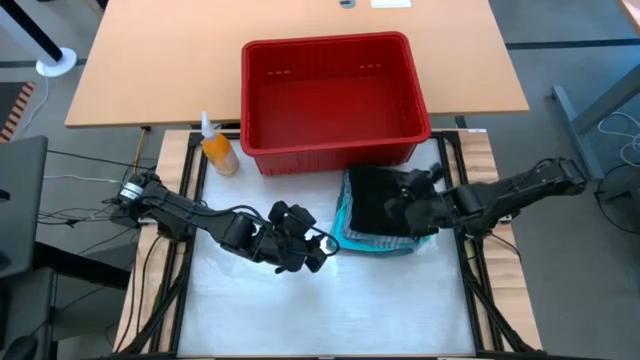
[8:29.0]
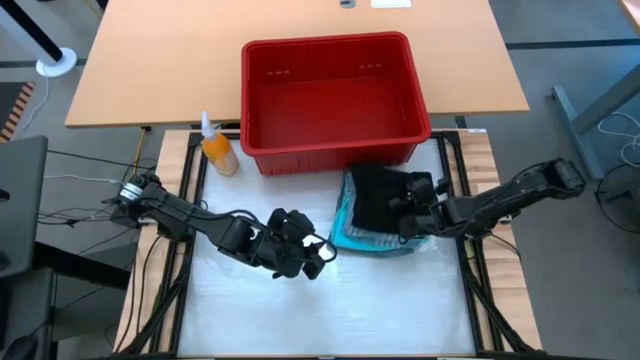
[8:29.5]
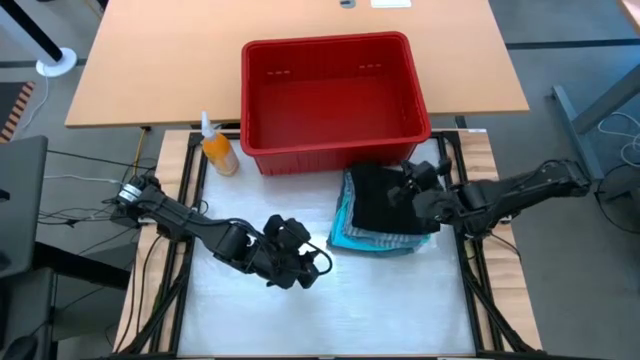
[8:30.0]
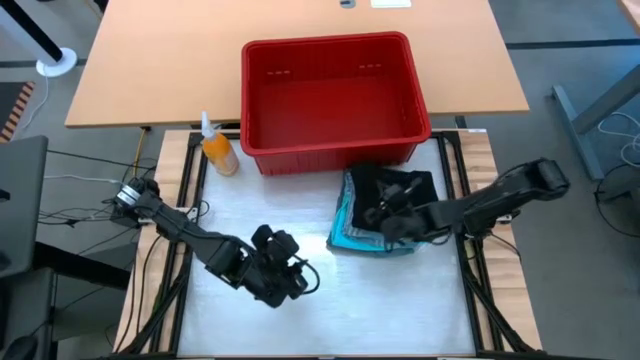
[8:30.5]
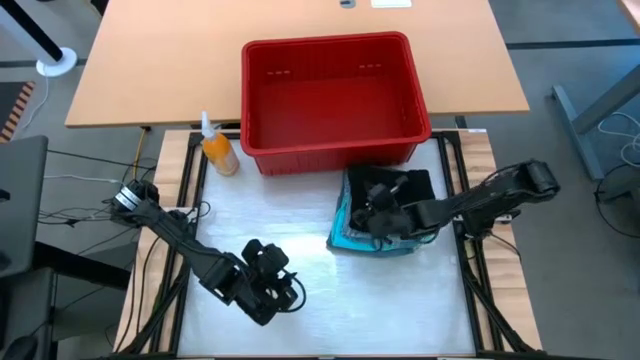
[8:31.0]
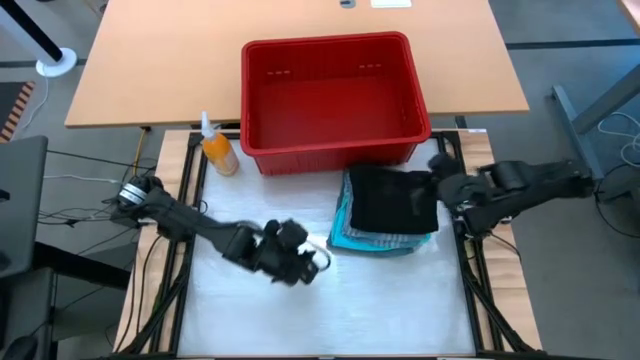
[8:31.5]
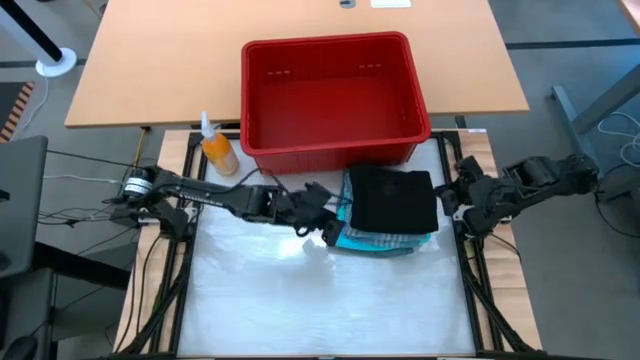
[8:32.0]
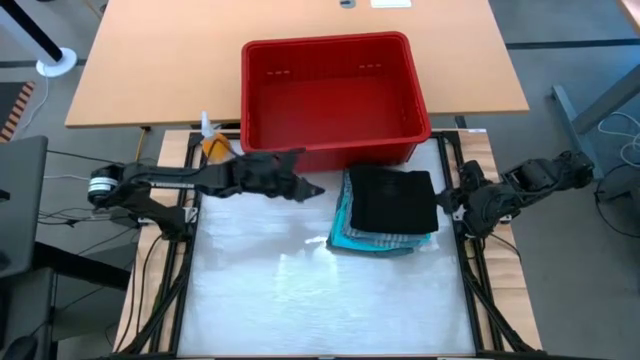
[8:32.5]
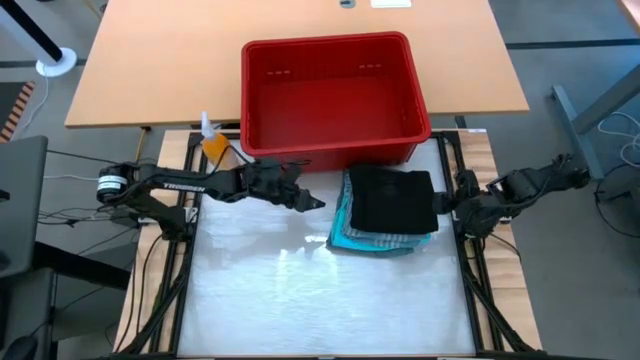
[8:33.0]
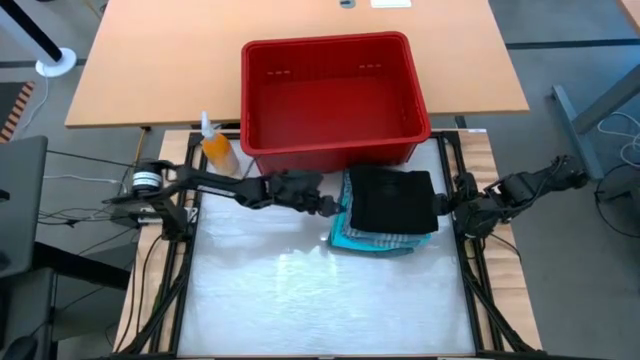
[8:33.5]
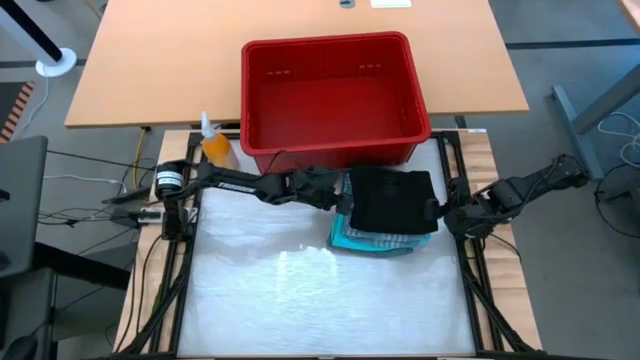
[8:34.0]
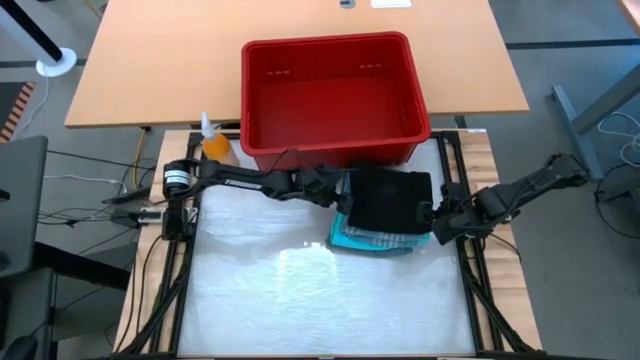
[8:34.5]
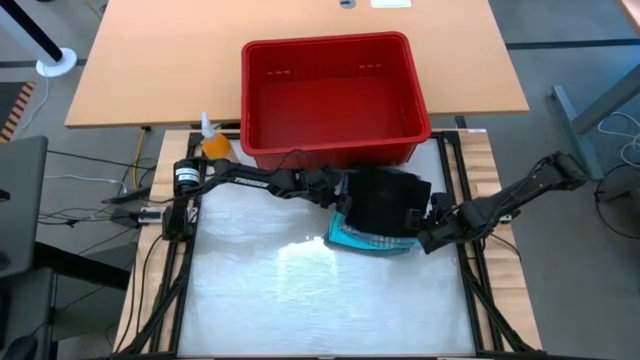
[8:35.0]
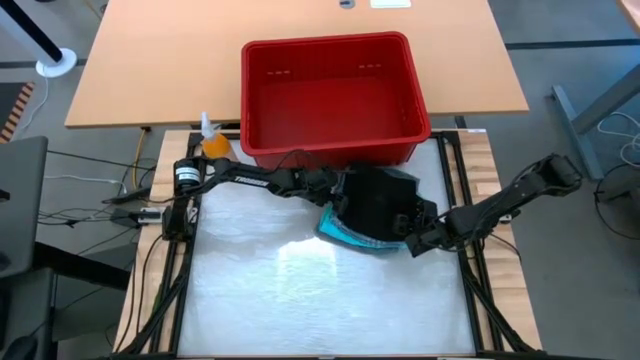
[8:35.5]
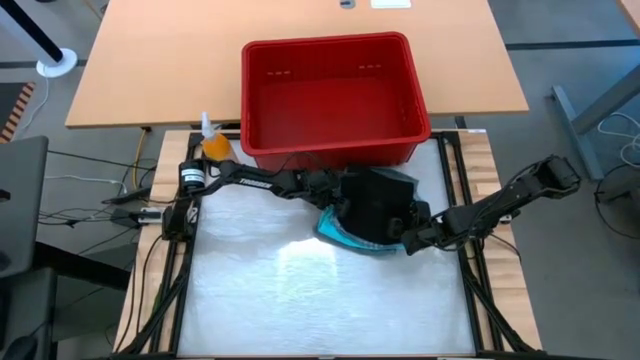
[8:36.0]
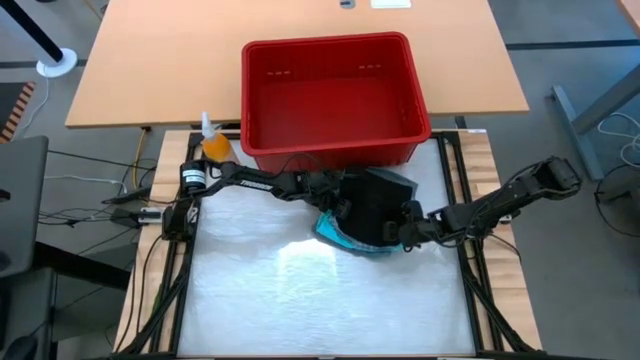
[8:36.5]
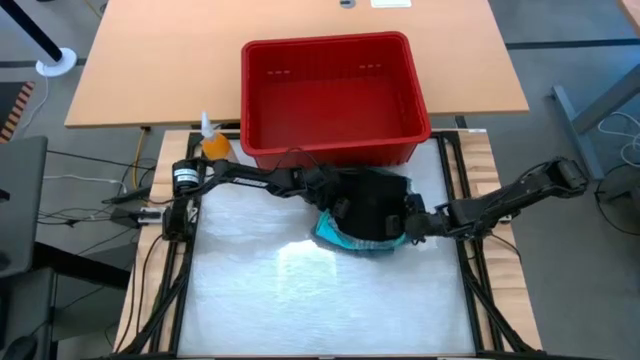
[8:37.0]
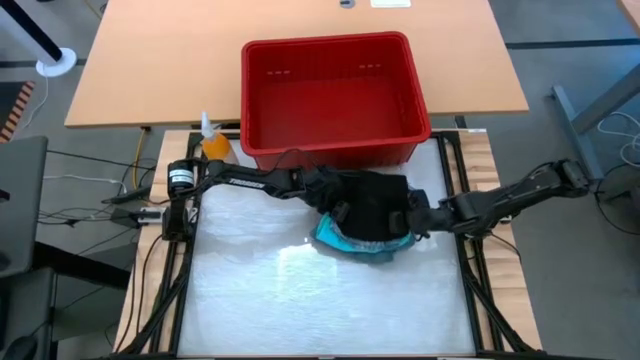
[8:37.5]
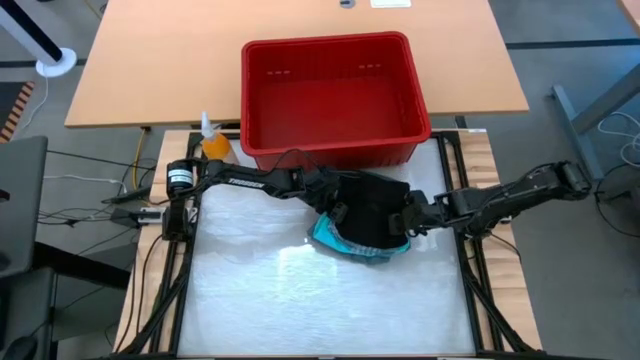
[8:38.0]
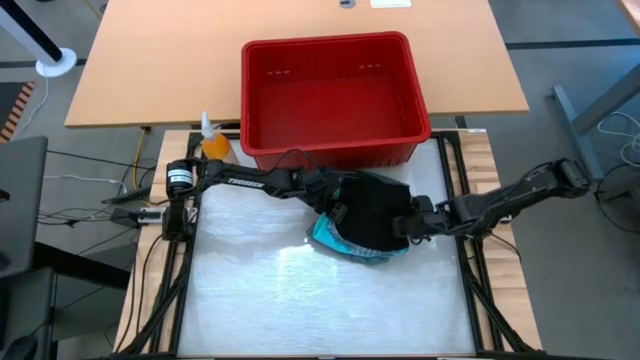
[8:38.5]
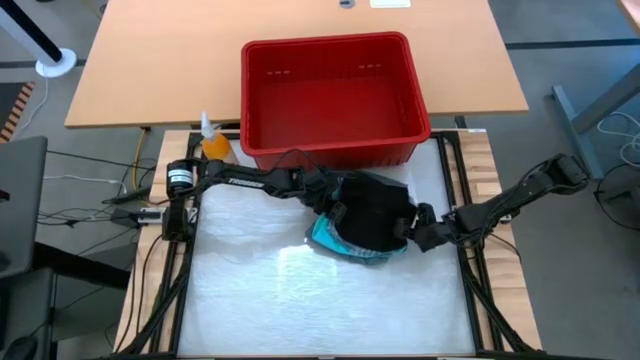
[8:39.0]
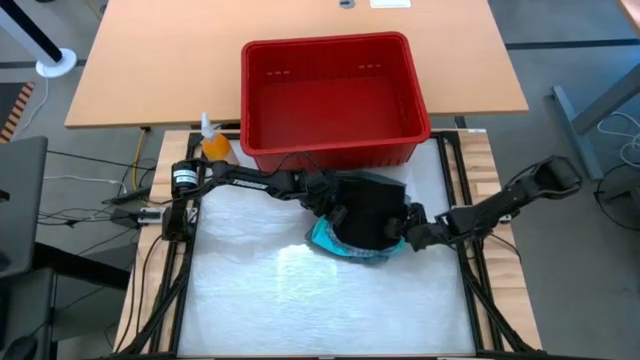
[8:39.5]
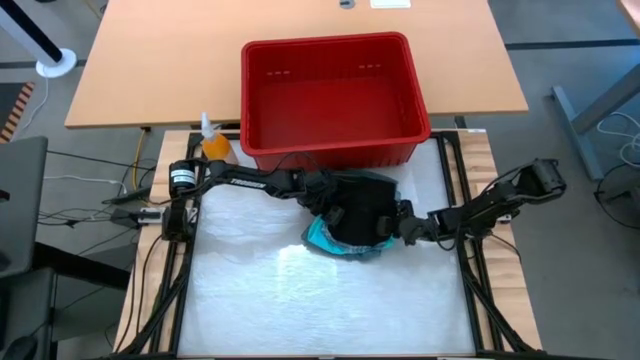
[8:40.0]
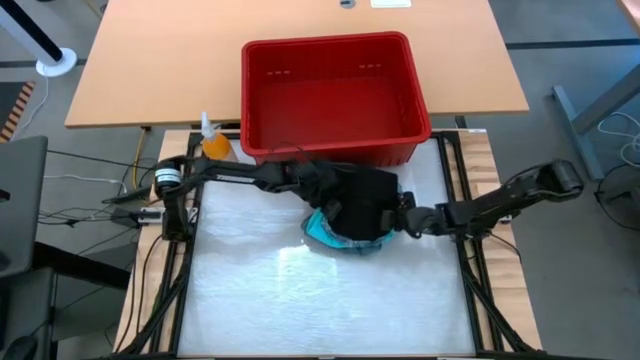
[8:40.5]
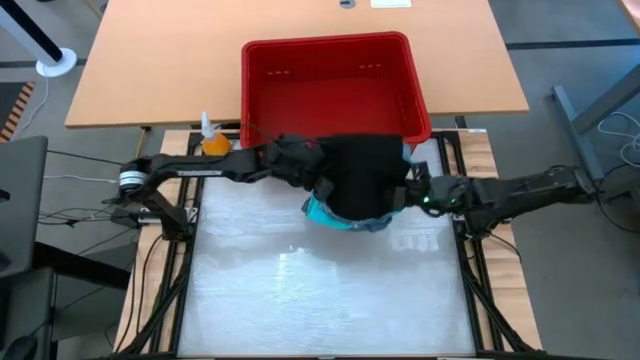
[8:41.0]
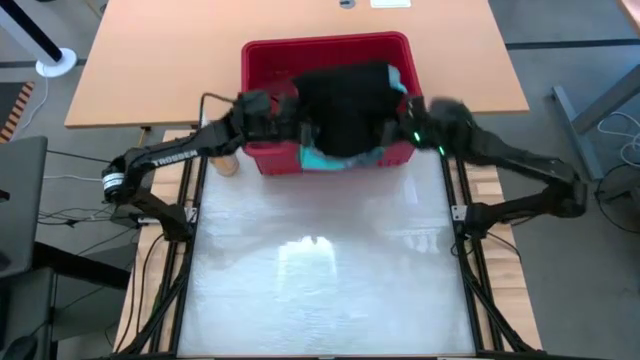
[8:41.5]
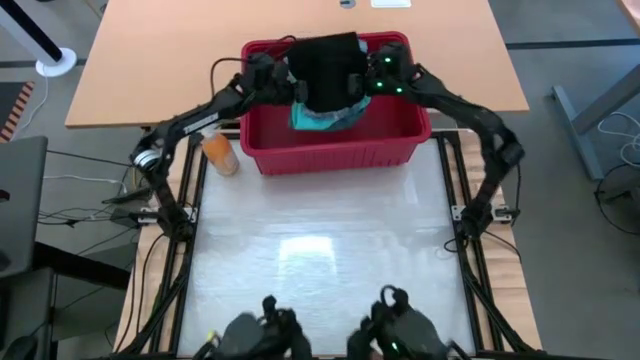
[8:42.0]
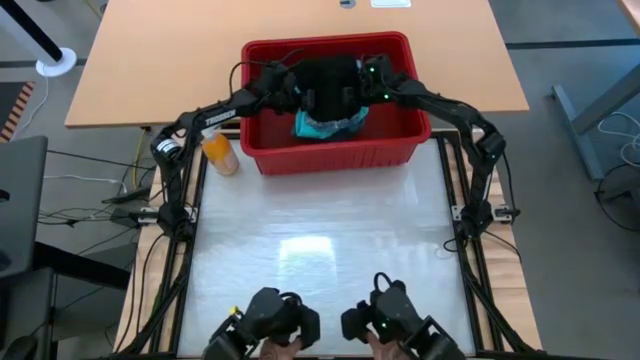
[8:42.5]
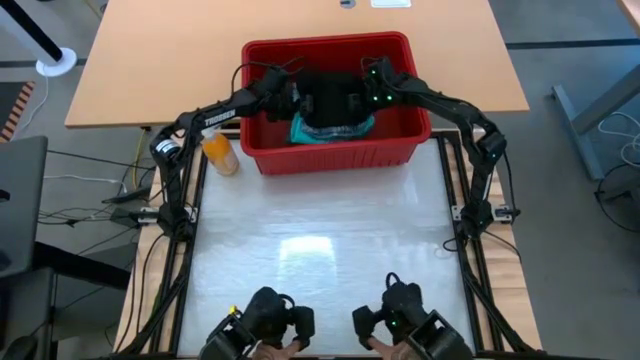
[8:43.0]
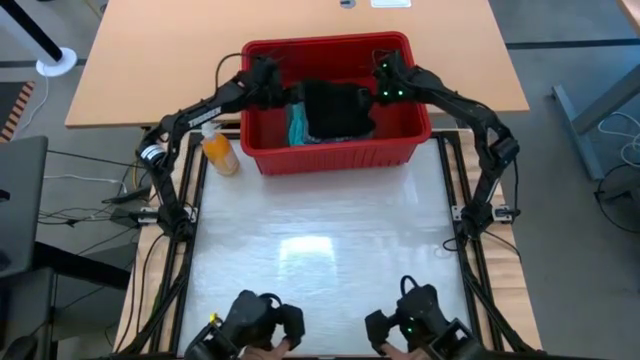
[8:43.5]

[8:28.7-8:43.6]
Task: Fold Laundry from Bin
Put the folded clothes into the red bin

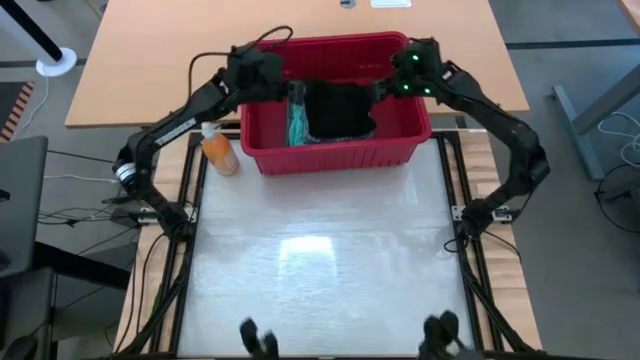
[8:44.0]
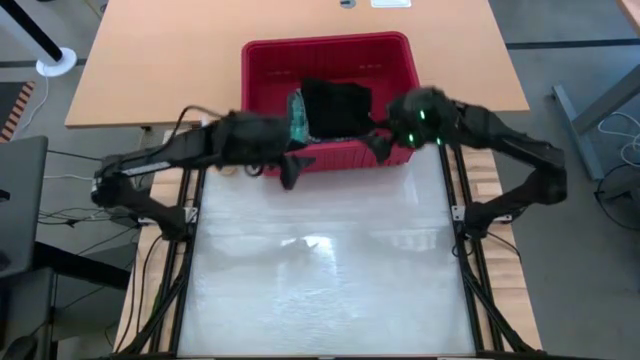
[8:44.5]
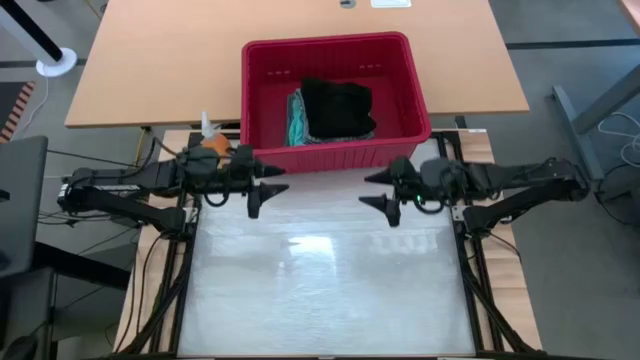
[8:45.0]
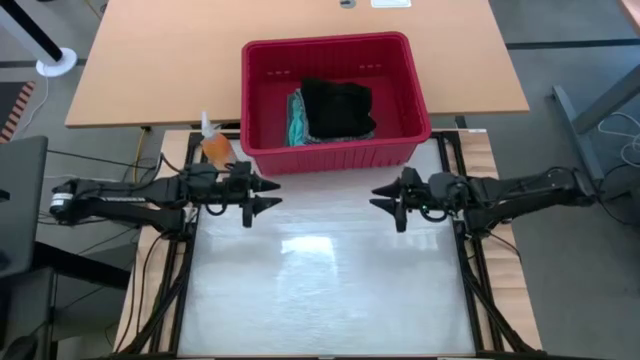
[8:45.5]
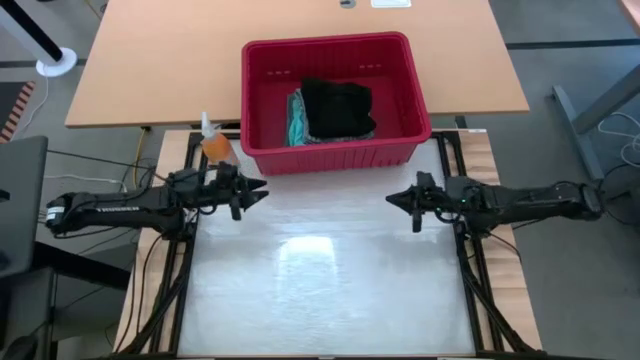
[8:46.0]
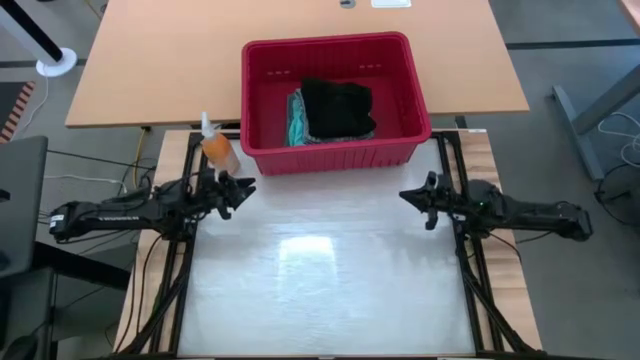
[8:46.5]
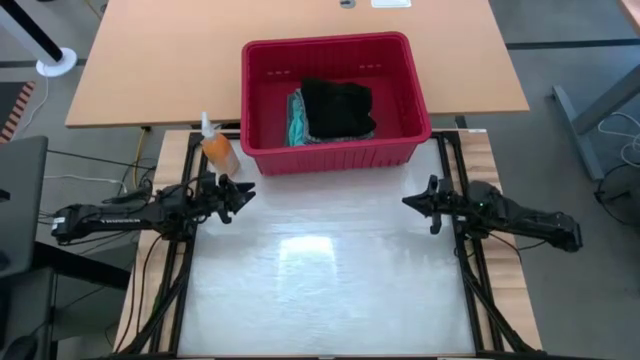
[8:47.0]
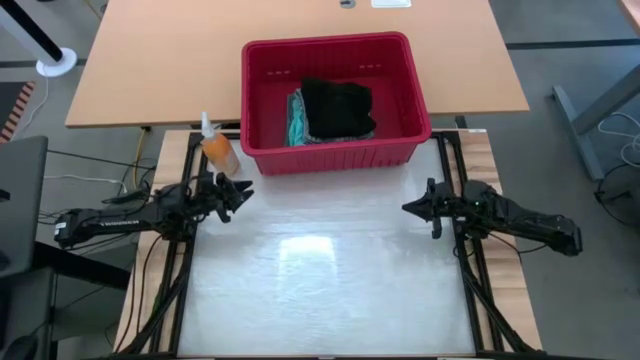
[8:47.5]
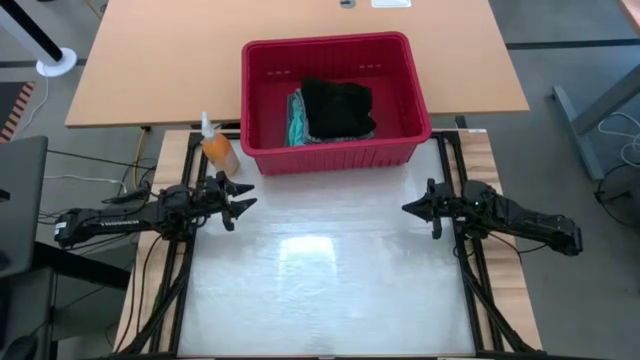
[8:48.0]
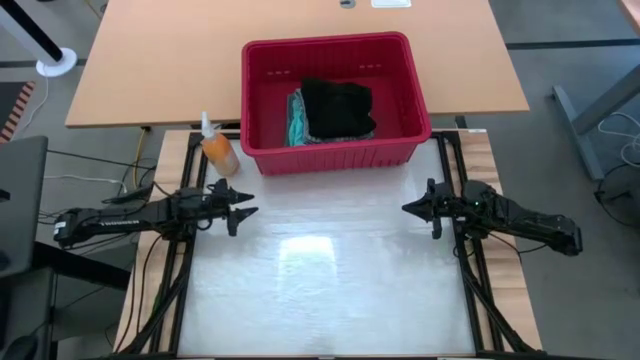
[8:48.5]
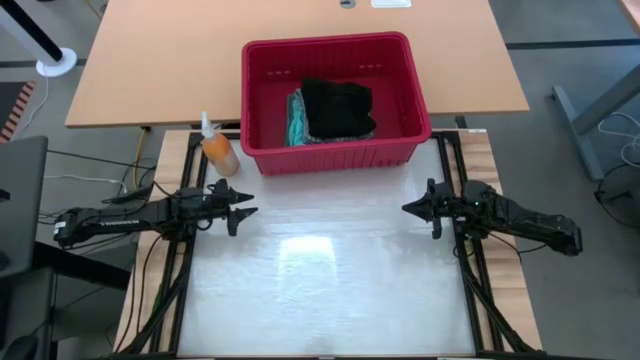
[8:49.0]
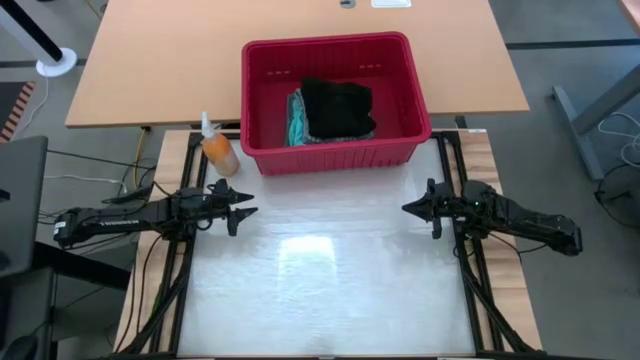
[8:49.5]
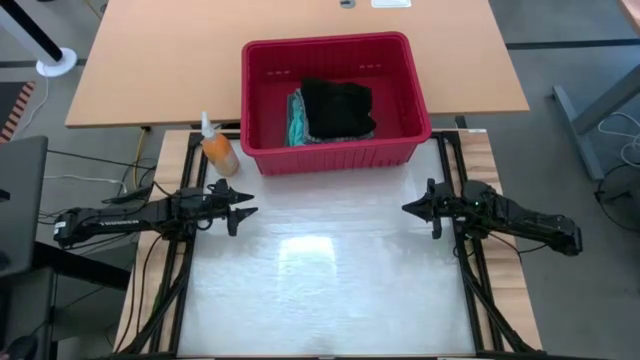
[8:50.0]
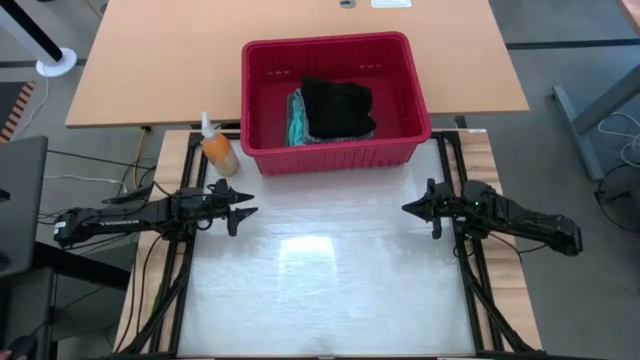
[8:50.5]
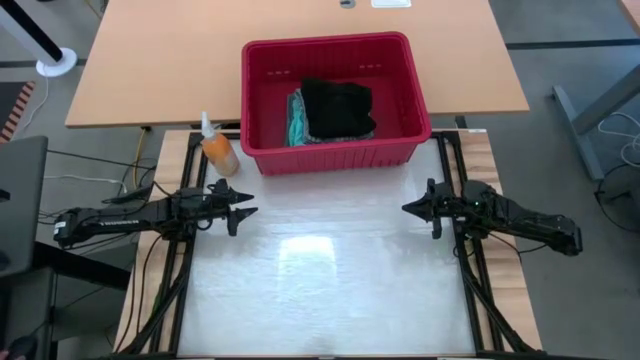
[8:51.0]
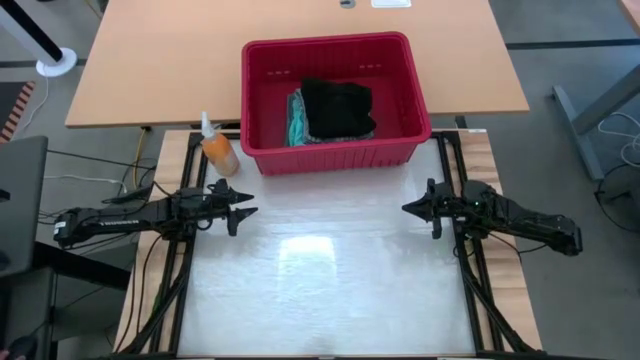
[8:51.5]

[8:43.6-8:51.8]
Return to Home Position
